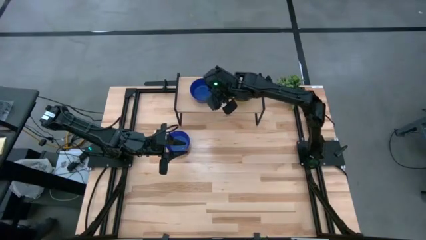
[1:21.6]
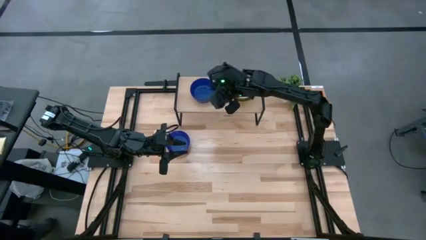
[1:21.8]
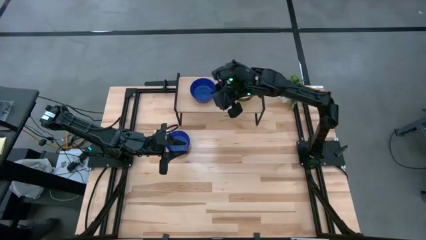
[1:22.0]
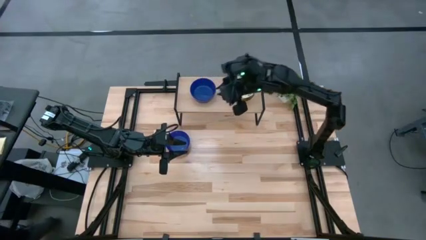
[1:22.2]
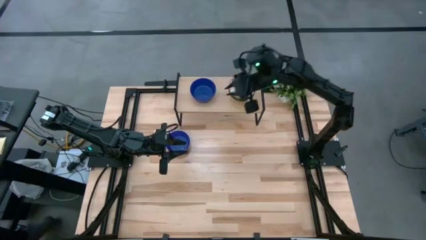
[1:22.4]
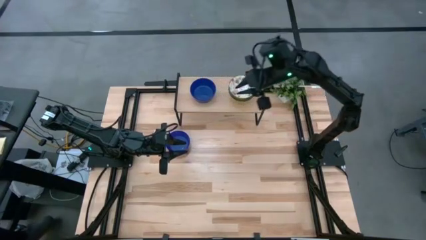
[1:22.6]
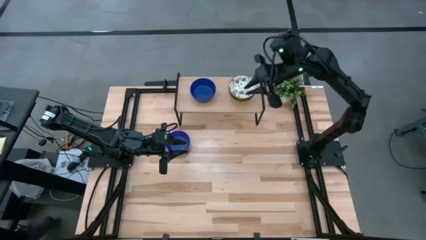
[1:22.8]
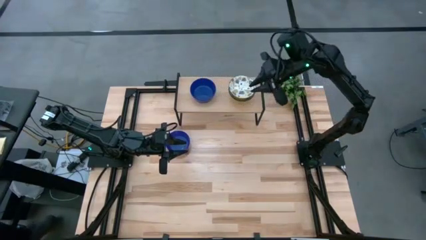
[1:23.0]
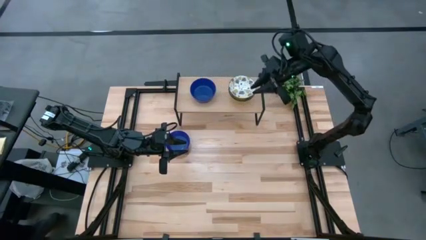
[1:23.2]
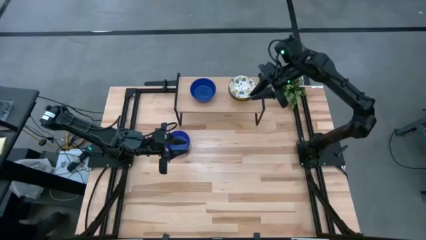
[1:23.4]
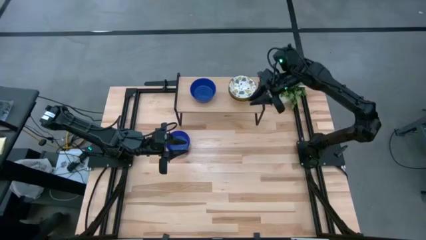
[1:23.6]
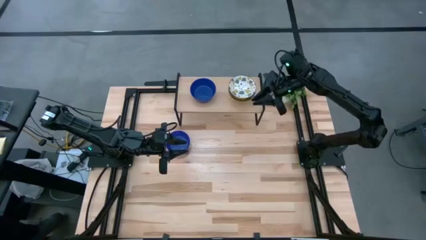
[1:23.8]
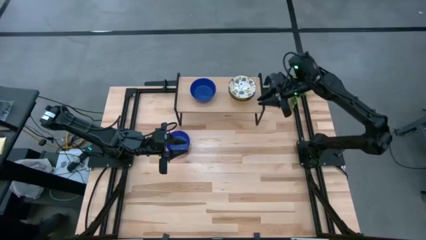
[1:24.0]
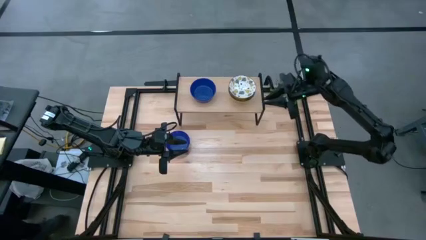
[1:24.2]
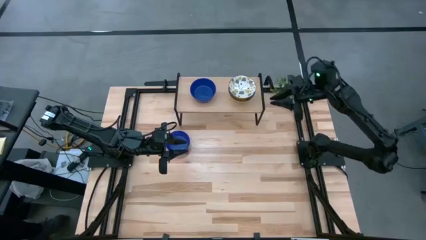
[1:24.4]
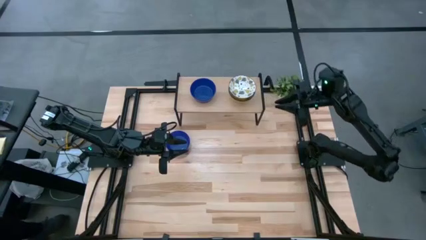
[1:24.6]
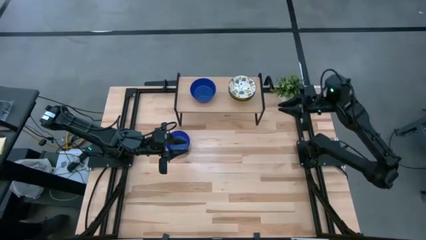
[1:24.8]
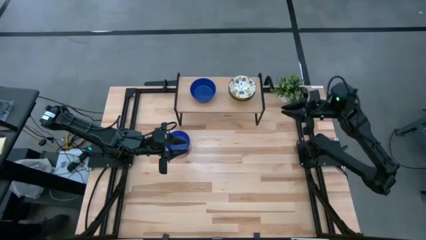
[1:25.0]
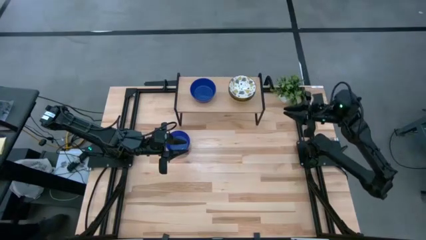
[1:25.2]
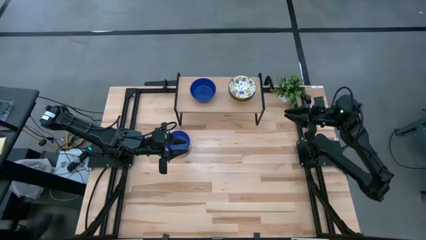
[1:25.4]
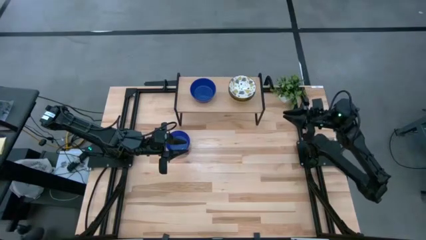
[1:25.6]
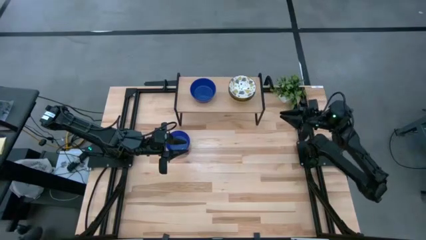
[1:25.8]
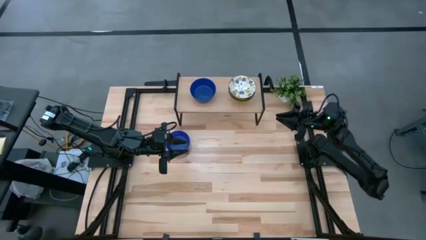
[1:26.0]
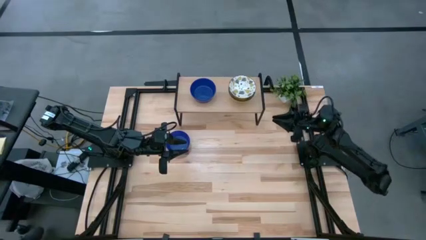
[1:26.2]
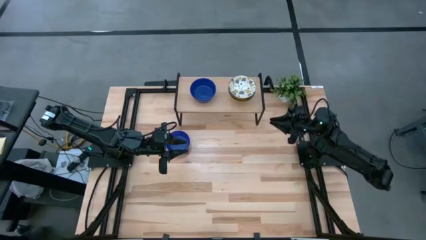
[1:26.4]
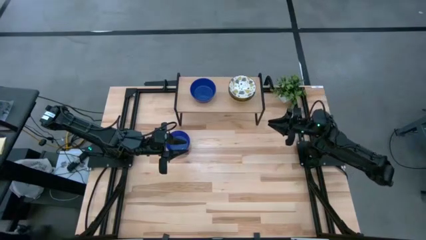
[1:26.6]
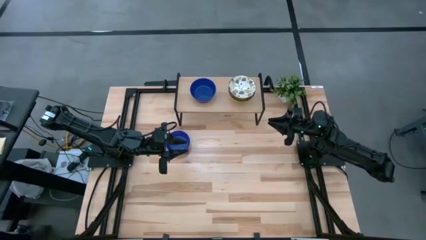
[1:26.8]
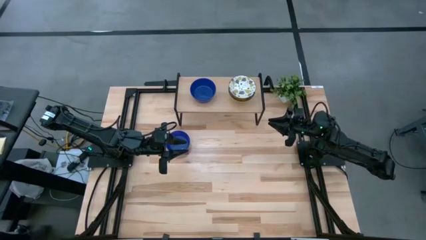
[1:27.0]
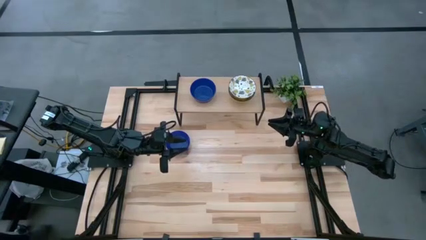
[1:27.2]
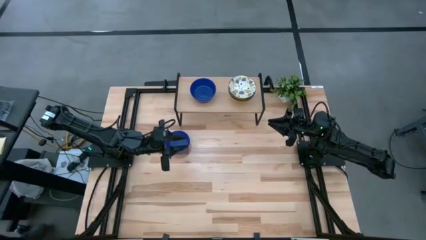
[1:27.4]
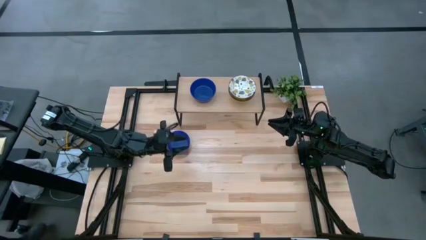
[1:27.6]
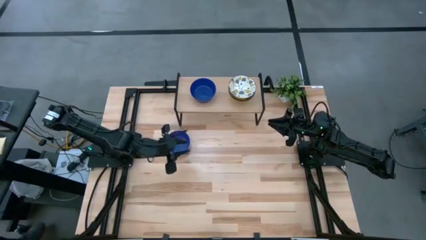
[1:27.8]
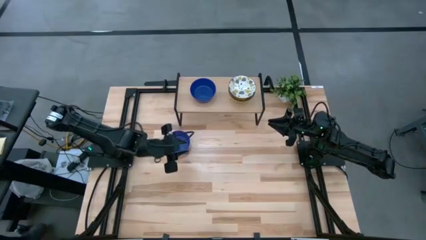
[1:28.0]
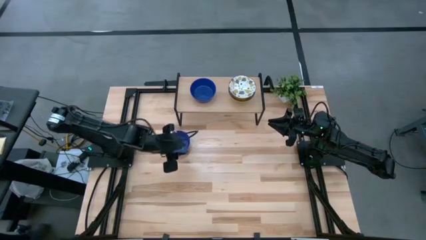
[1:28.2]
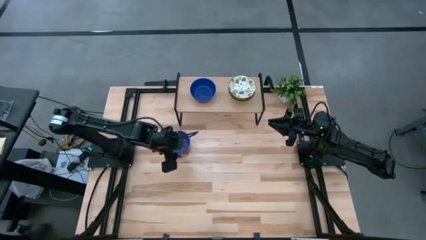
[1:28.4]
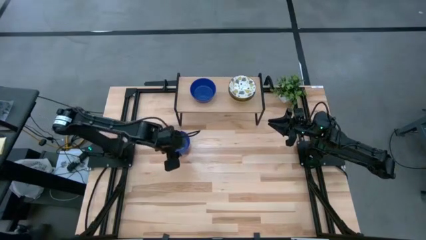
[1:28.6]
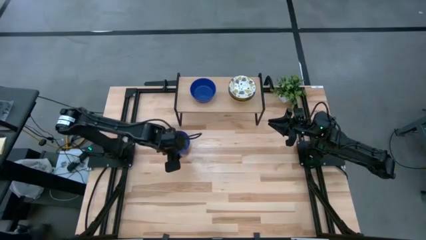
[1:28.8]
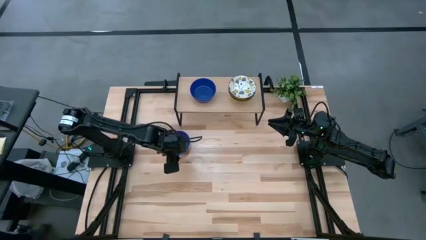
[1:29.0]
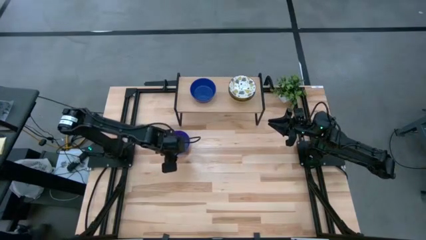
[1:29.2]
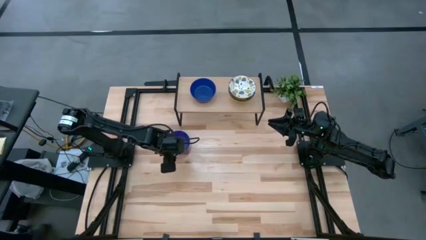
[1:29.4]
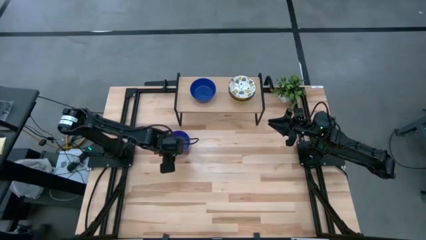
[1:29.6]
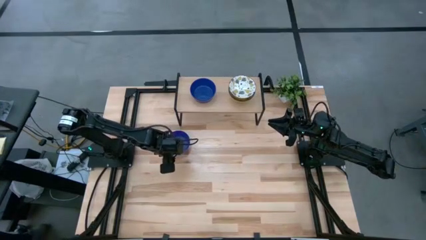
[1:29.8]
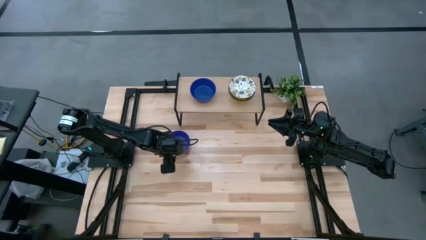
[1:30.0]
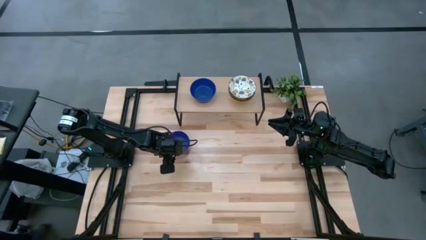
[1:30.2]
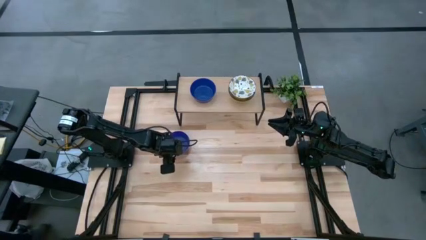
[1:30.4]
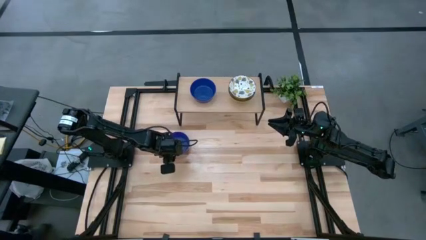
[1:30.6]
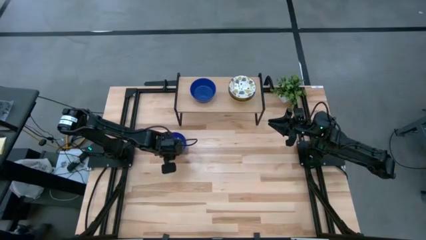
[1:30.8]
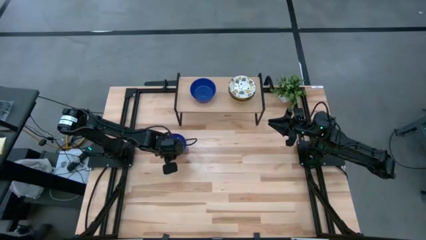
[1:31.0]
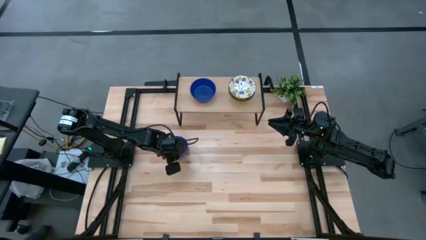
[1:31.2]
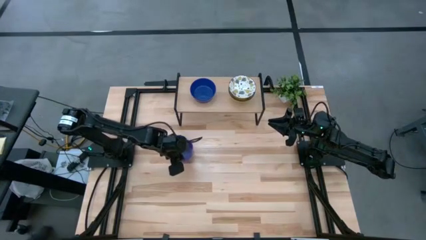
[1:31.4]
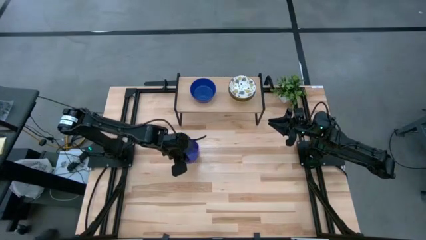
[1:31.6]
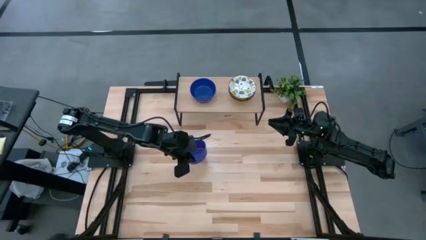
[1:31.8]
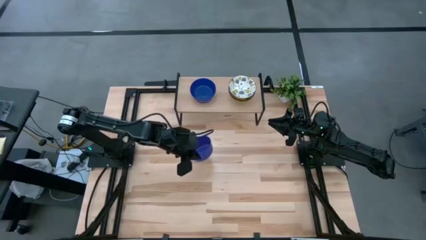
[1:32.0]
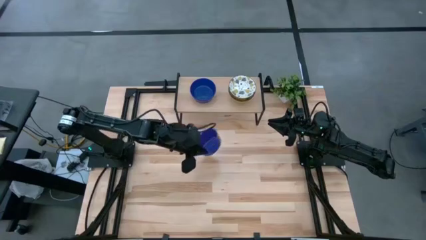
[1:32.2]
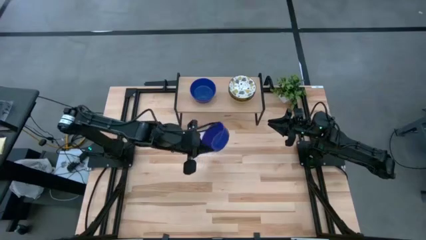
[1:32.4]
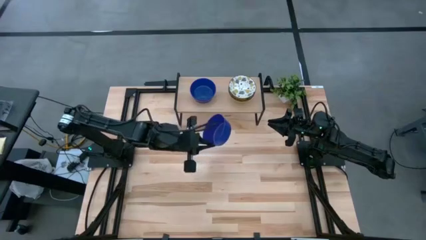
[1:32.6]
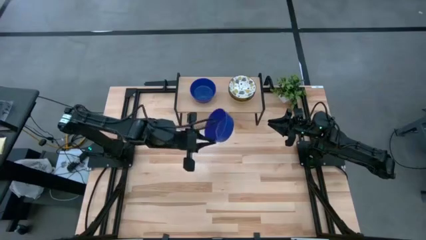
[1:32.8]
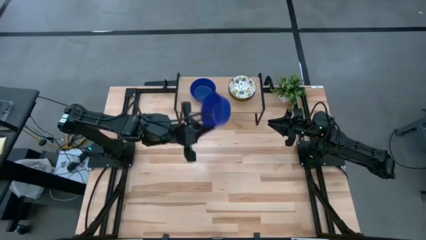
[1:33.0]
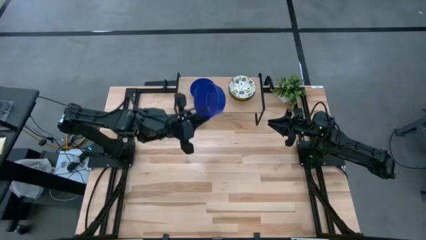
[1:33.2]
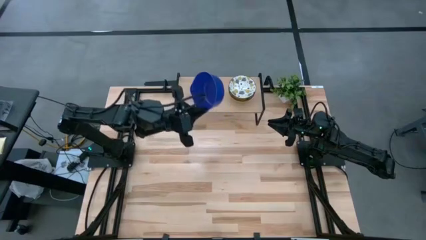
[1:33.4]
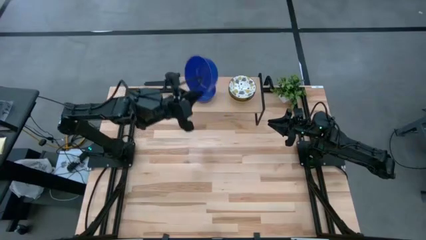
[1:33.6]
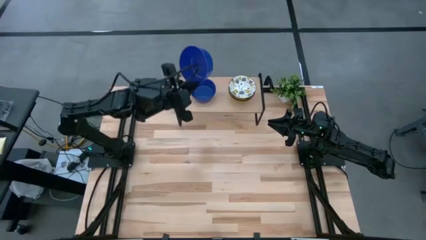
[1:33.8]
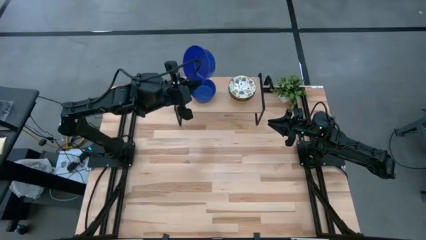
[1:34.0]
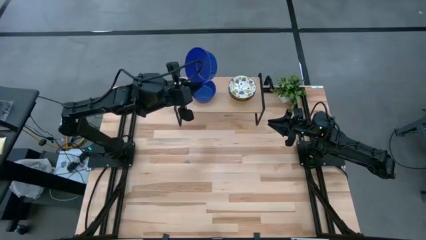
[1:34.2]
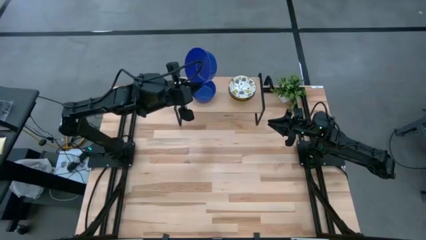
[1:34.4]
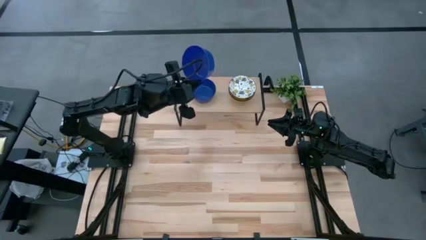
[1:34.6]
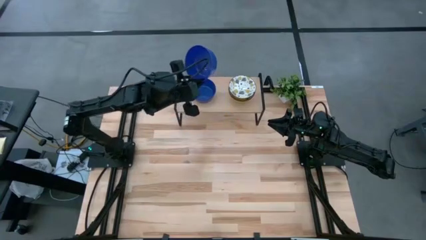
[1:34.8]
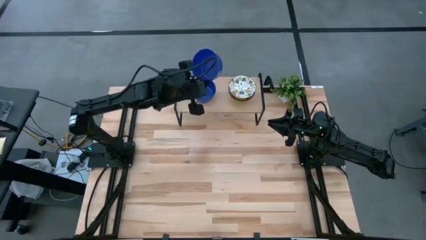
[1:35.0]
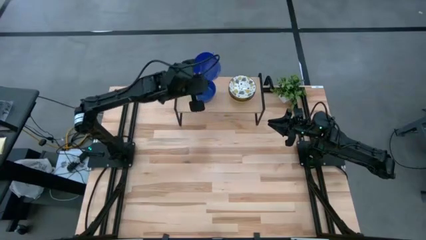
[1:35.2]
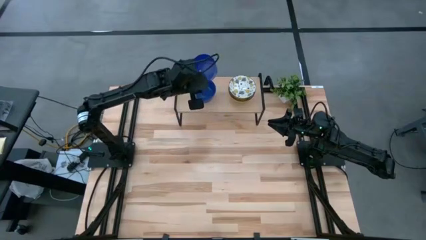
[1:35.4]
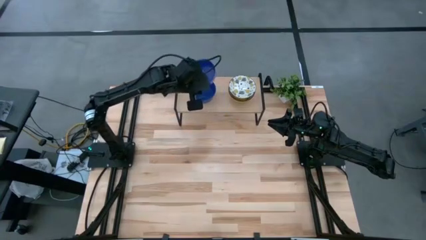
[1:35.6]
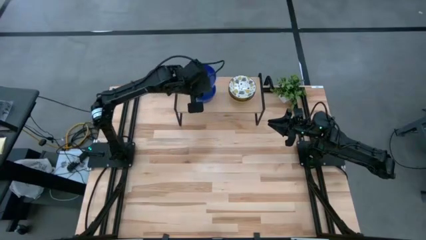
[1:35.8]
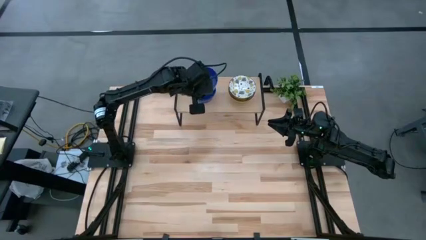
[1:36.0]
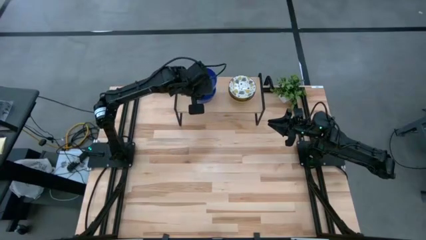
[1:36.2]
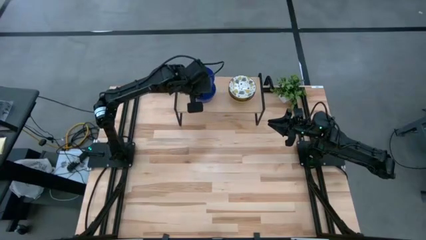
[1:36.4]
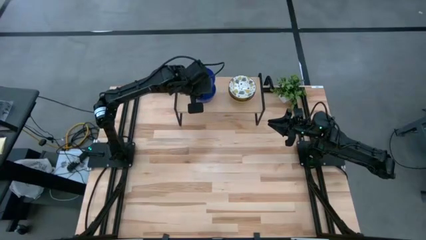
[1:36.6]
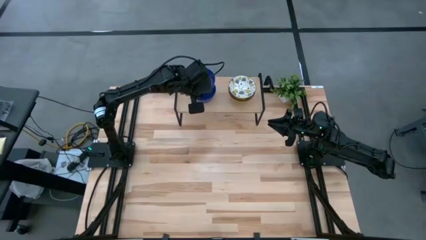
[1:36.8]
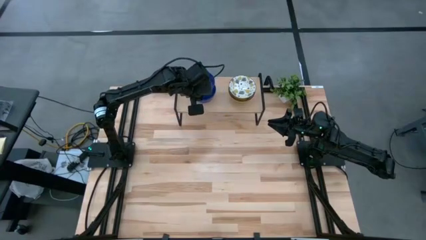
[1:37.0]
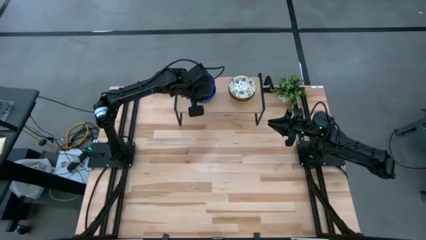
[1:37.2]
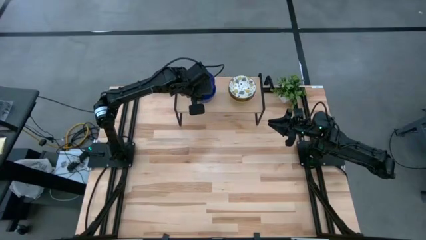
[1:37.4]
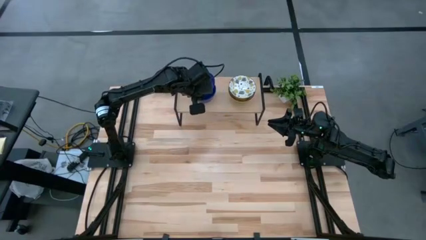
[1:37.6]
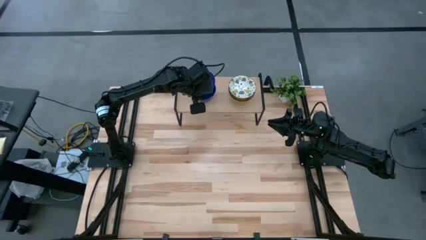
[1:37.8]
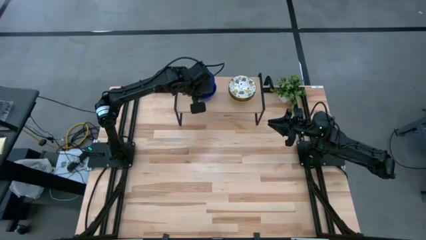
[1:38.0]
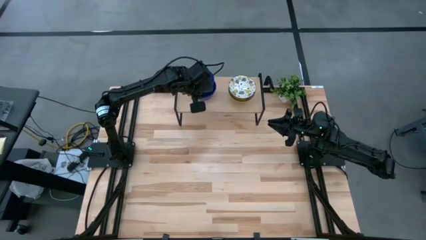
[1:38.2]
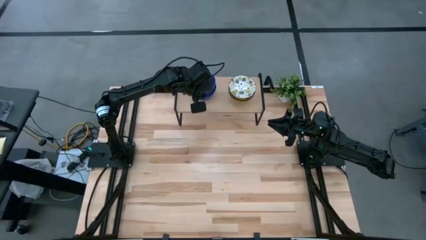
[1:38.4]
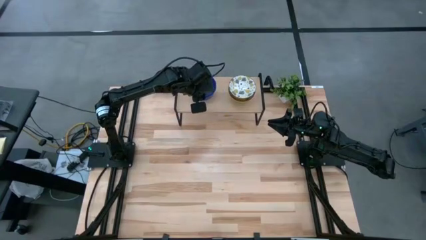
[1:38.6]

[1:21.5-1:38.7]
Task: Pick & Place Mini bowls
Stack the blue bowl on top of the blue bowls on the shelf
